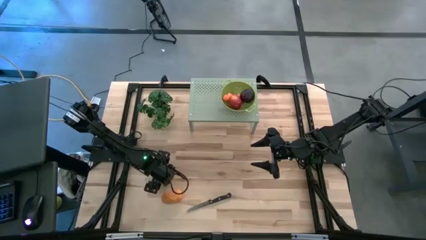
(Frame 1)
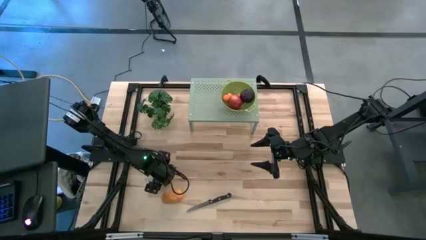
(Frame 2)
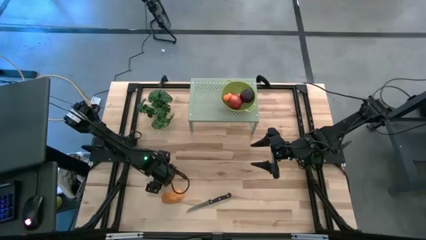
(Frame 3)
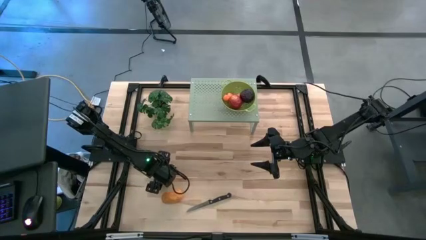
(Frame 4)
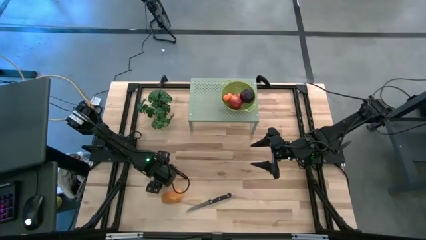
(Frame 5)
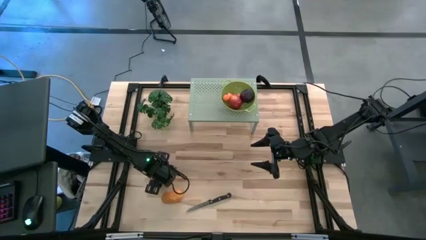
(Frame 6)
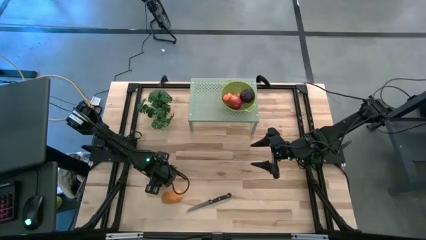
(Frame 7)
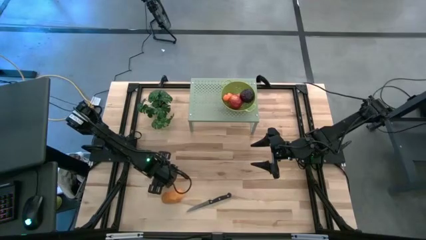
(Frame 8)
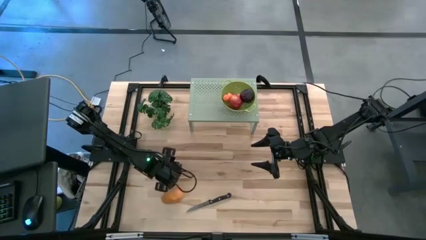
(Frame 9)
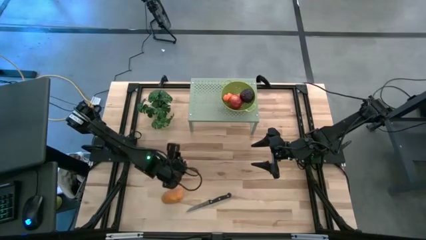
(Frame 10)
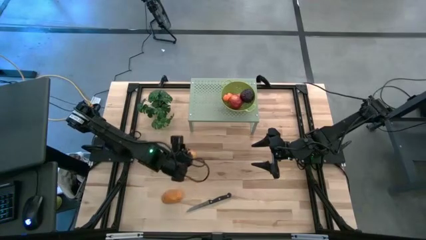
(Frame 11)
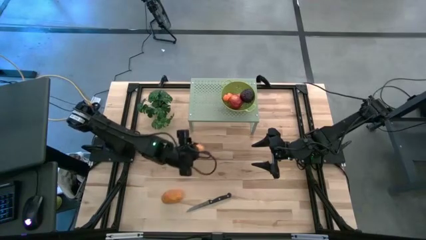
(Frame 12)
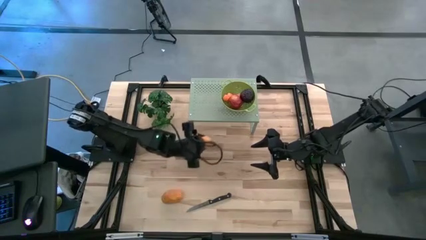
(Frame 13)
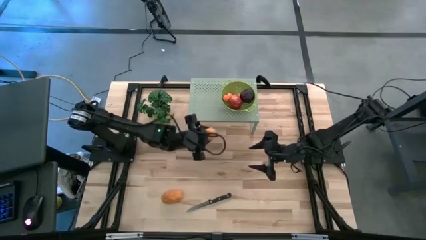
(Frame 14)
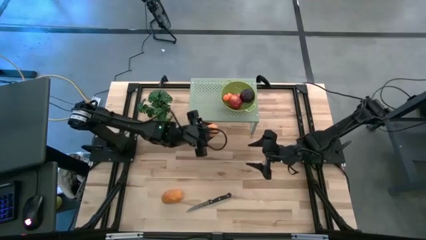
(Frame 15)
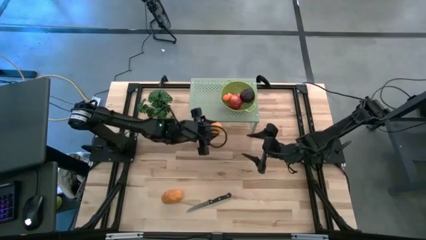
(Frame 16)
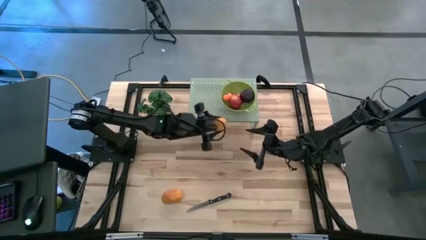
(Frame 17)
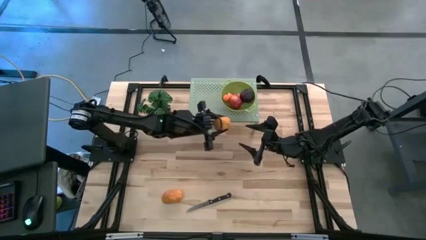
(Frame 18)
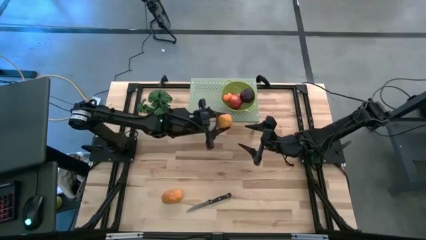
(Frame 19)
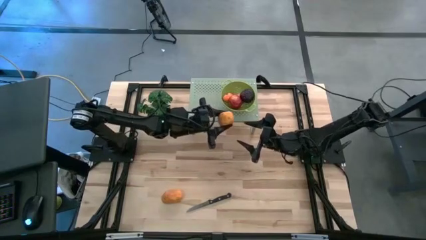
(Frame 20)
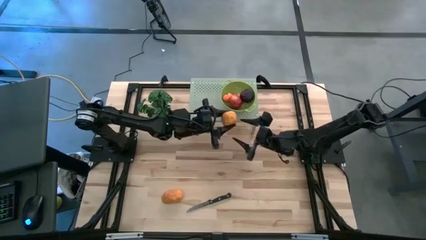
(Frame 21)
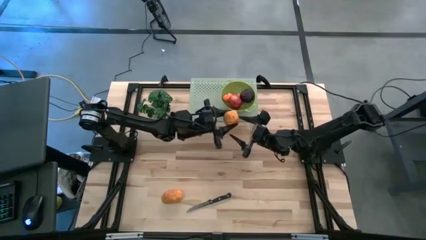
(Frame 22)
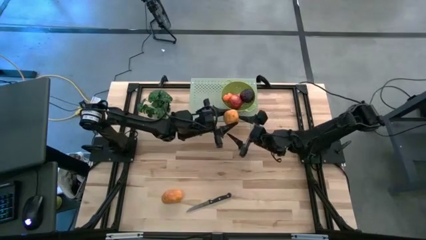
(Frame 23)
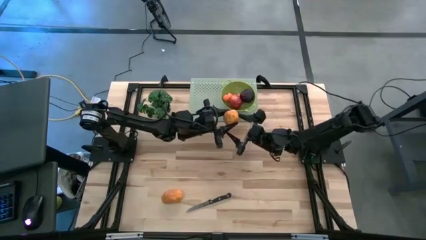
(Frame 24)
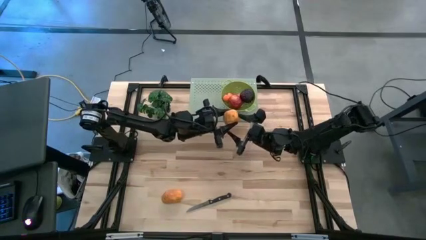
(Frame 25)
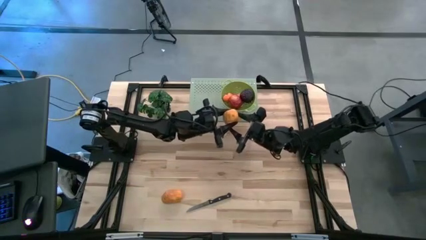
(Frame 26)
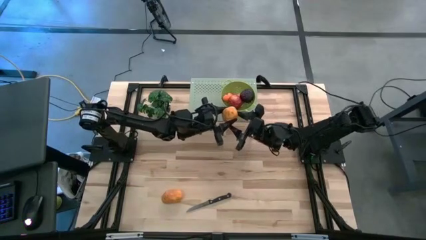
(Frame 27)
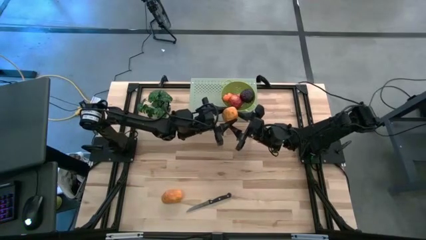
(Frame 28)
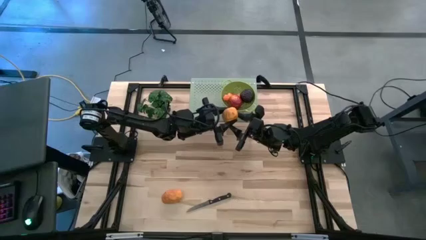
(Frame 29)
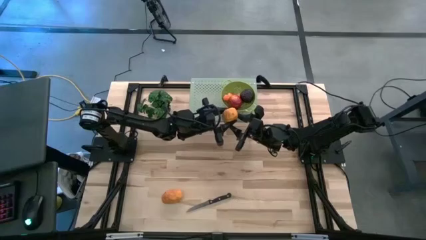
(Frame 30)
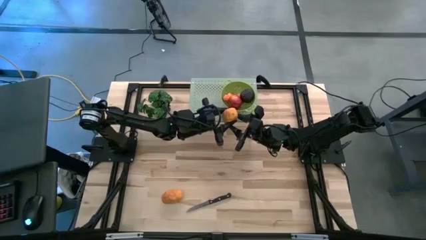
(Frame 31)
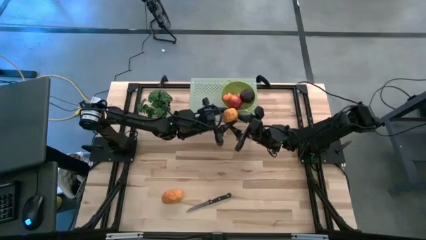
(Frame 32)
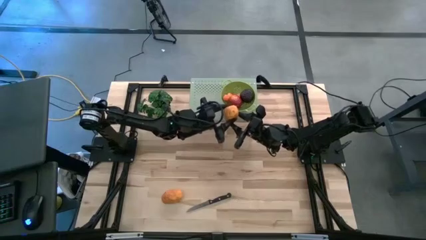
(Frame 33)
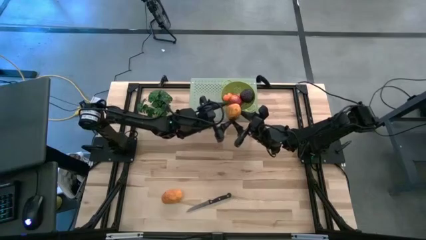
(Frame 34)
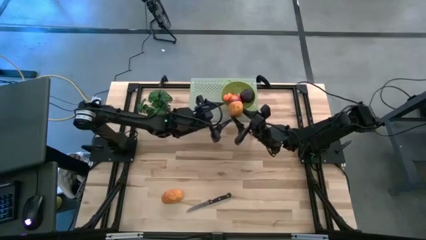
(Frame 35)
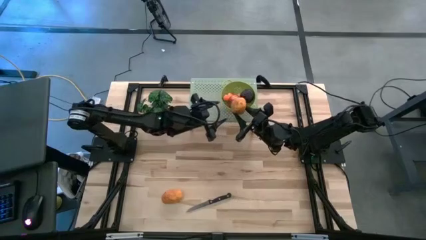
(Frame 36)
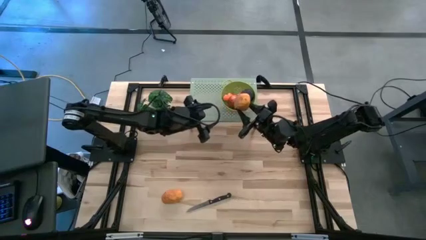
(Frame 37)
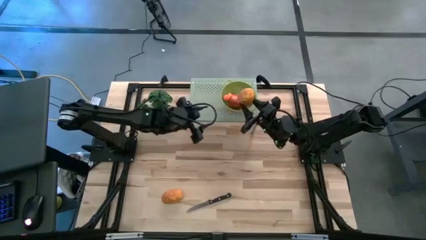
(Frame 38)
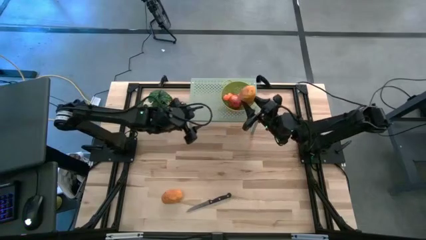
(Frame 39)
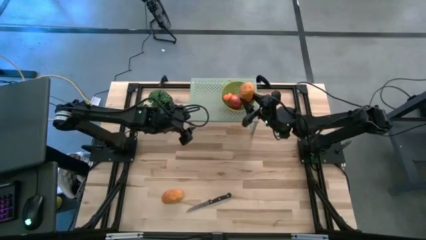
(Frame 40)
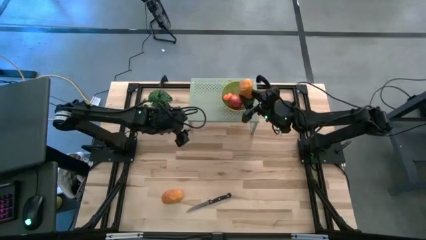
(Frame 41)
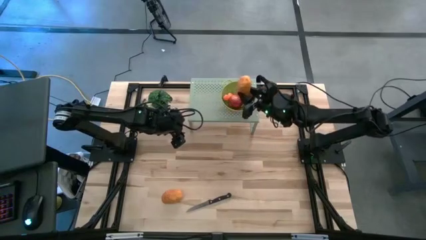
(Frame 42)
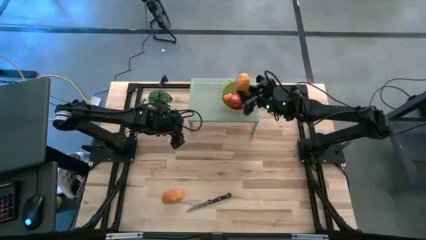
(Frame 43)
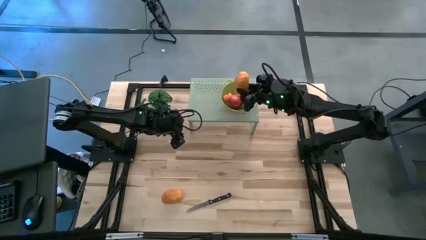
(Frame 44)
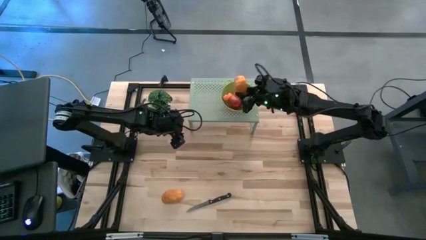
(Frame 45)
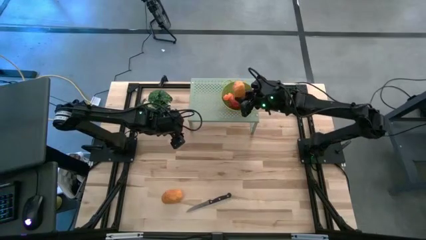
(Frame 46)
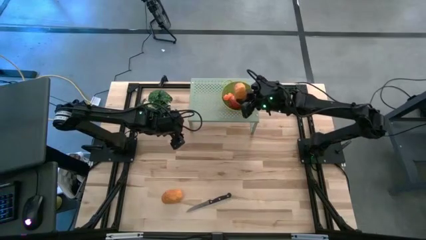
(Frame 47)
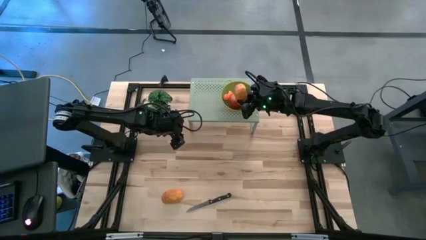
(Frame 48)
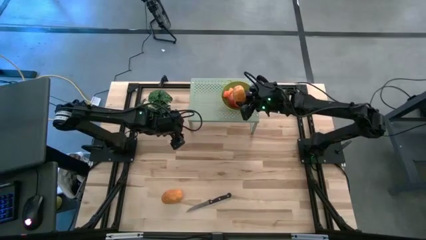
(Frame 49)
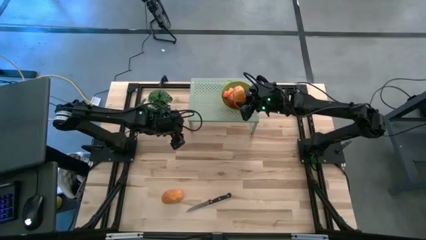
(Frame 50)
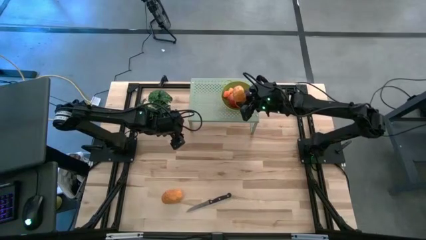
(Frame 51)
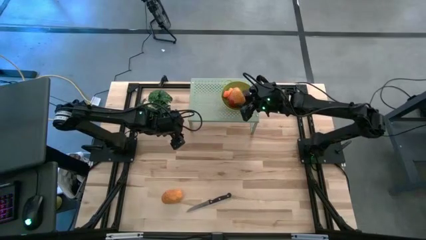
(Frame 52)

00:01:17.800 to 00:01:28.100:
Task: Pick & Place Fruit
Put the top mango into the strainer bowl on the shelf
